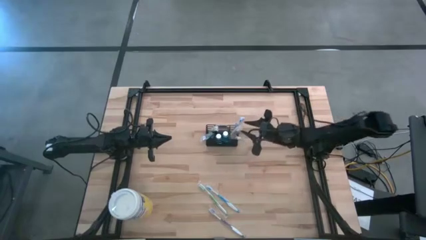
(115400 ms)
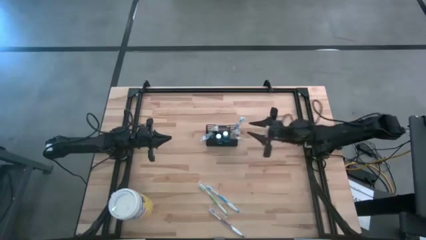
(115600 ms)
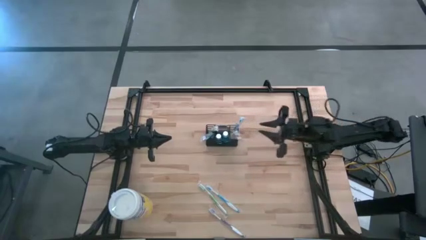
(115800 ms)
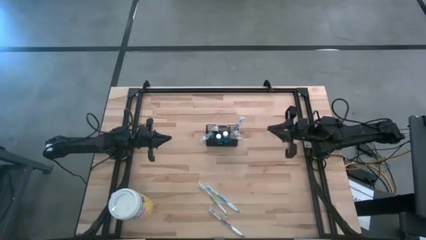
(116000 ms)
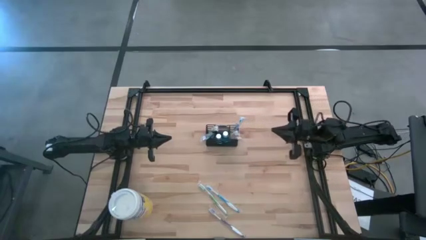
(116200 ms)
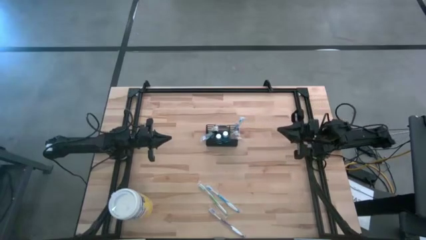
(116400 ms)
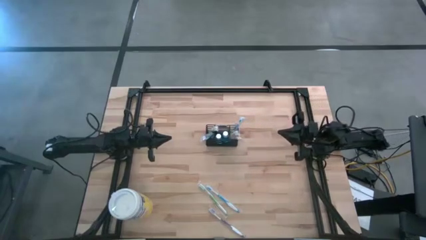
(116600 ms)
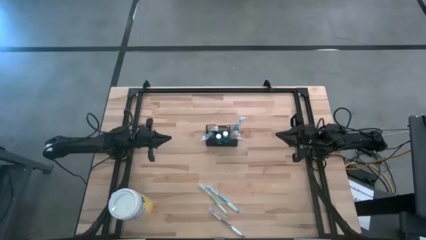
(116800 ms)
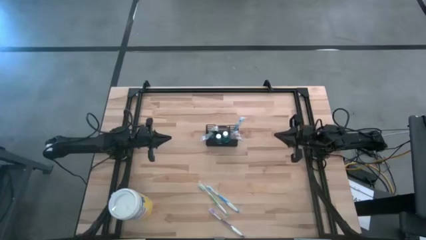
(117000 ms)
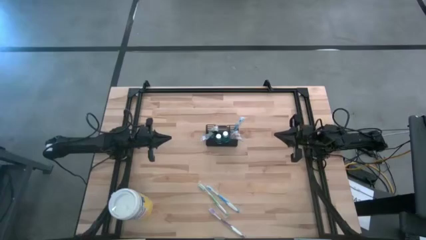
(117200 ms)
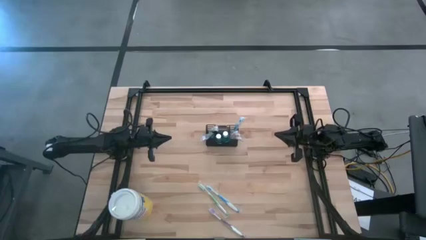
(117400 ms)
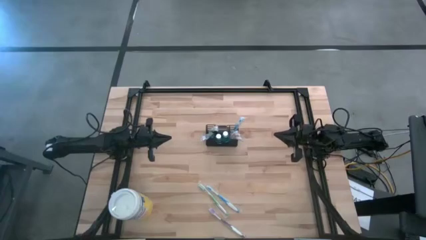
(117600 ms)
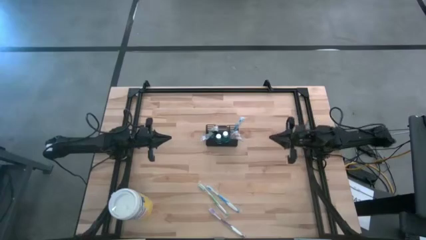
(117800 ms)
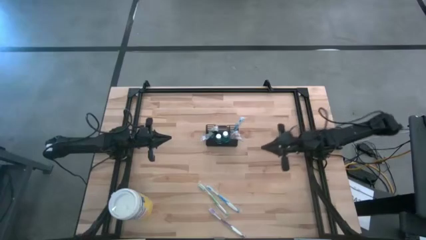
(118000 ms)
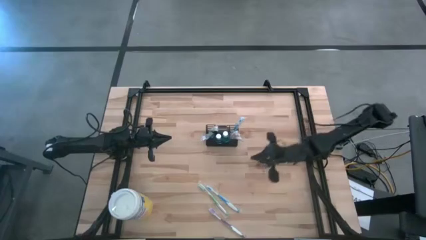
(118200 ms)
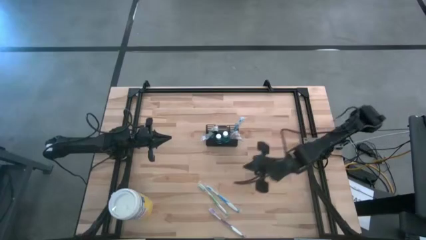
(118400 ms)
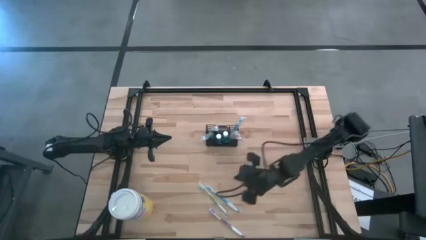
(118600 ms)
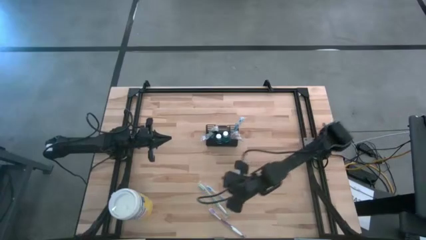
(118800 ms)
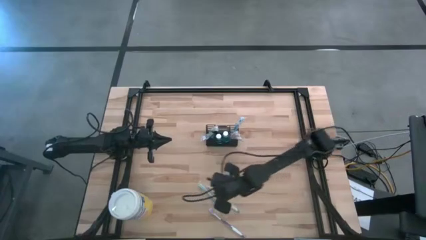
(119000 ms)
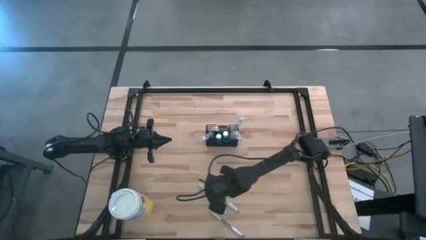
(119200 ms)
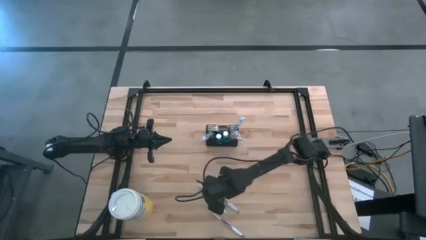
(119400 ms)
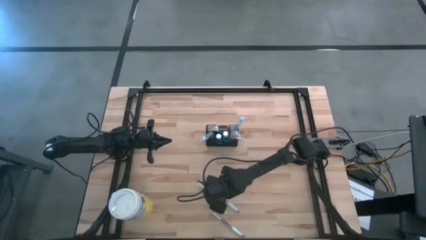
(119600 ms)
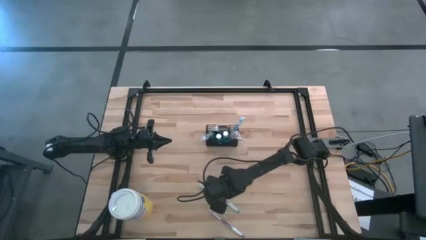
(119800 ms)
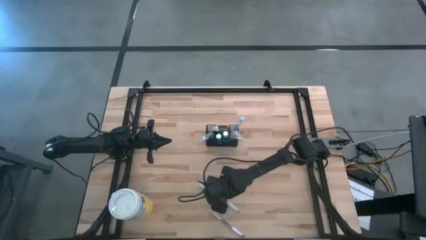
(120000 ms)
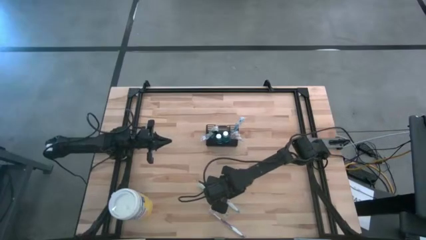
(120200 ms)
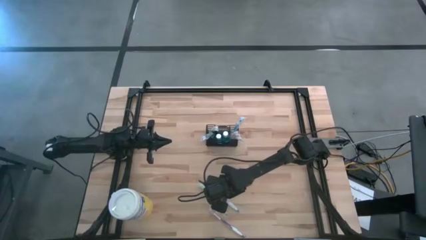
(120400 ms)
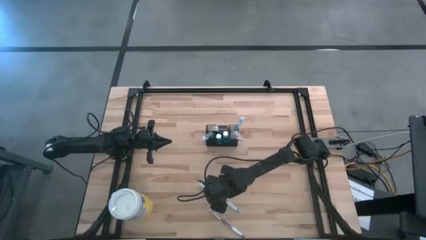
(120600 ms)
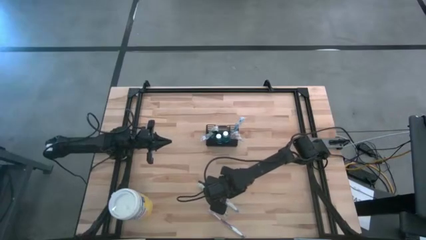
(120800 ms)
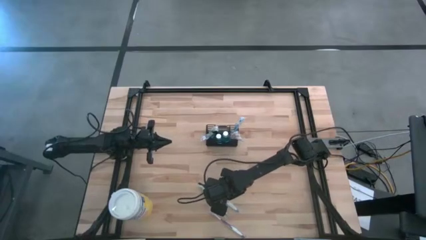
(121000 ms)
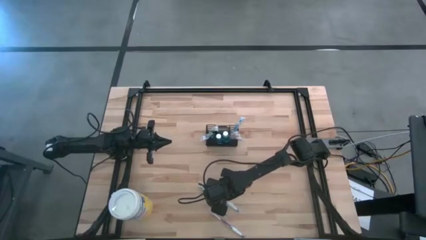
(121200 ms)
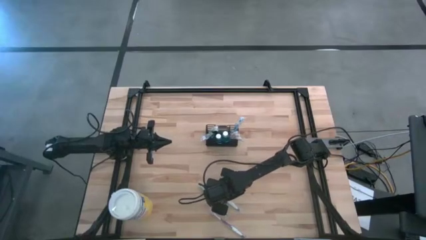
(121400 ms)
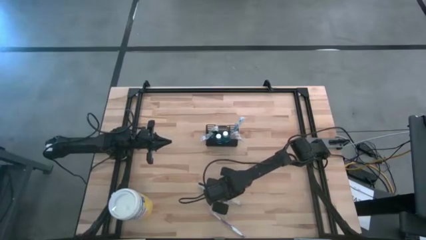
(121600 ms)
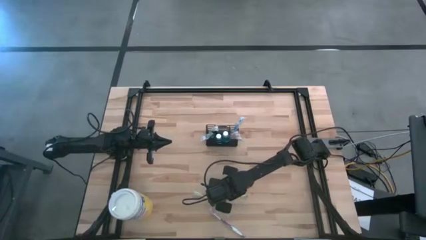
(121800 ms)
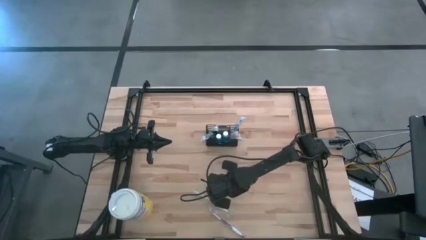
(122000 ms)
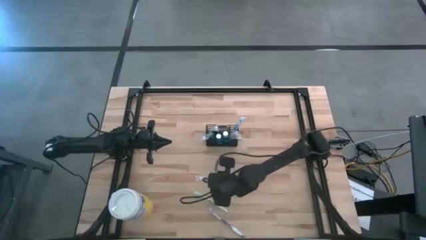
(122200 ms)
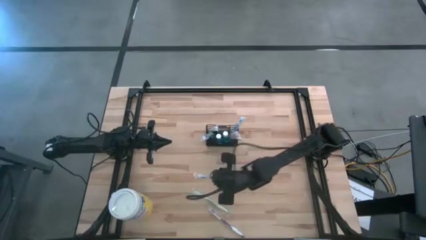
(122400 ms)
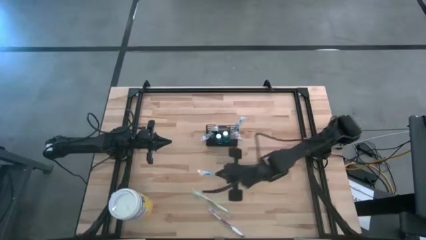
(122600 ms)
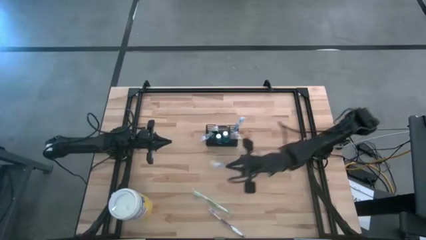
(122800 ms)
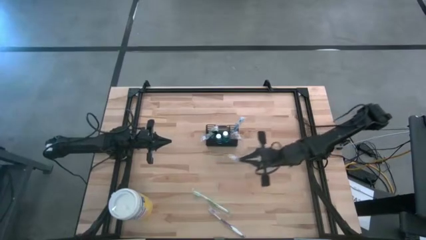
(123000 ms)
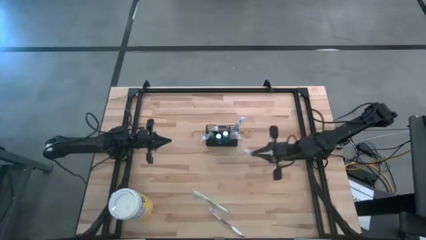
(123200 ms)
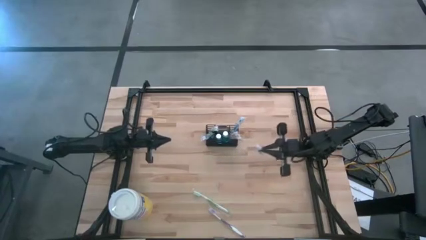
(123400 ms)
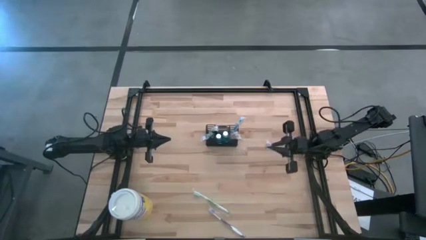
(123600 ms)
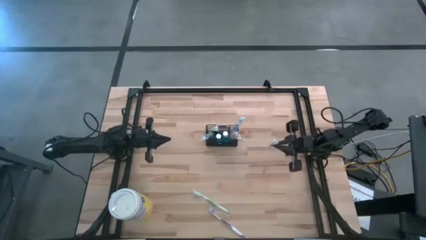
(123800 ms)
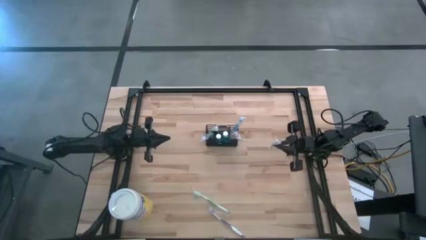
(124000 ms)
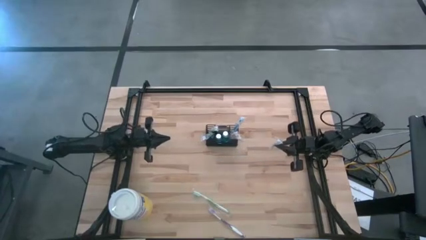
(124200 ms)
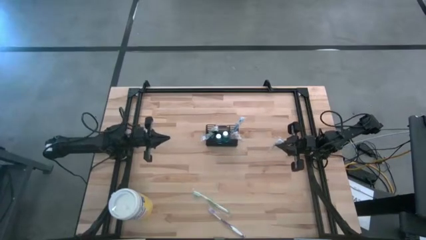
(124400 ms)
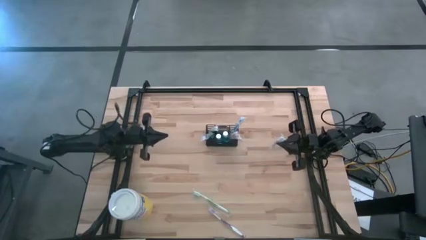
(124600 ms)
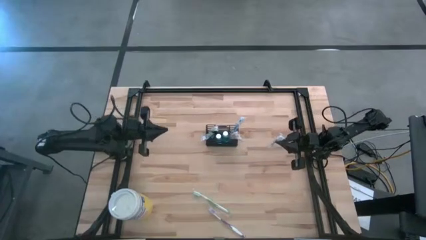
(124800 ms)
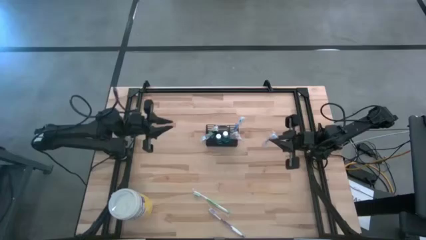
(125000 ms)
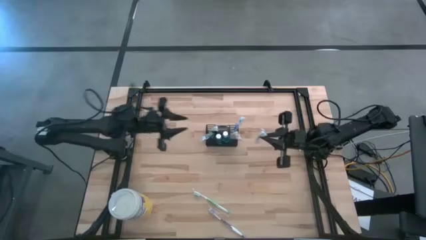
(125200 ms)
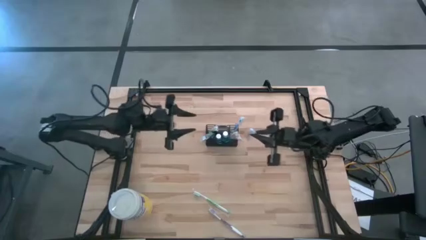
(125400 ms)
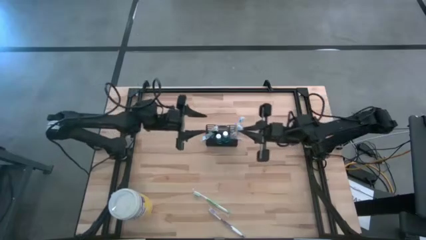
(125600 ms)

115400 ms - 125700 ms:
Task: Pick & Place toothbrushing station
Put the blue toothbrush into the wire organizer

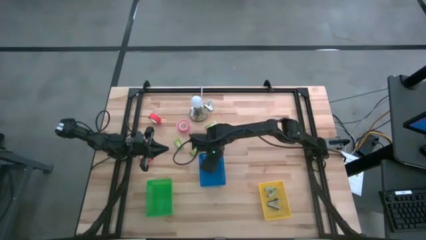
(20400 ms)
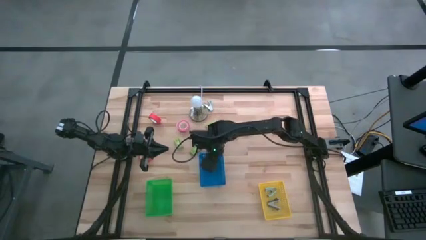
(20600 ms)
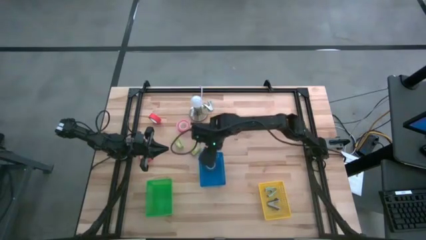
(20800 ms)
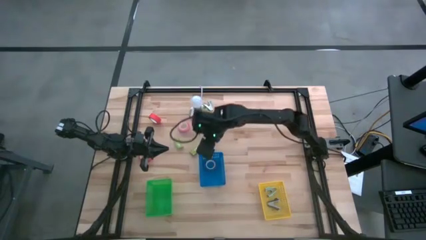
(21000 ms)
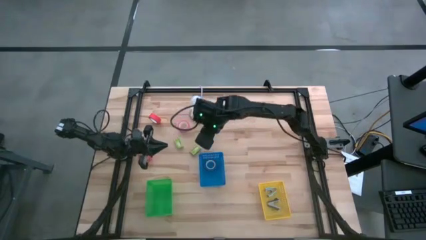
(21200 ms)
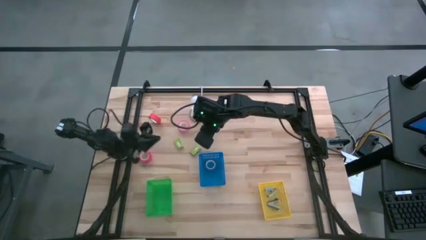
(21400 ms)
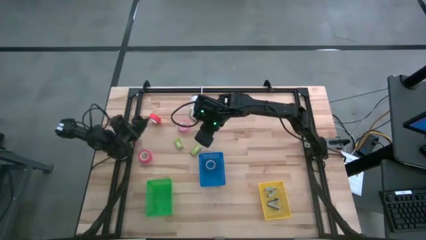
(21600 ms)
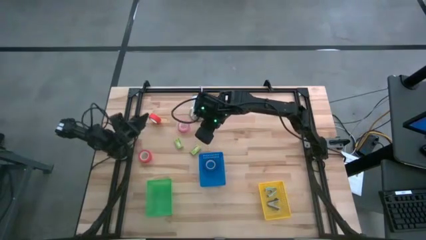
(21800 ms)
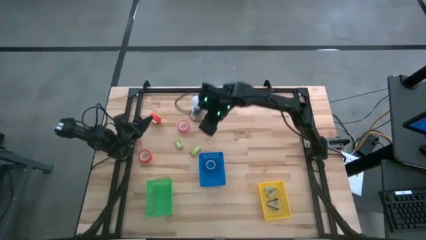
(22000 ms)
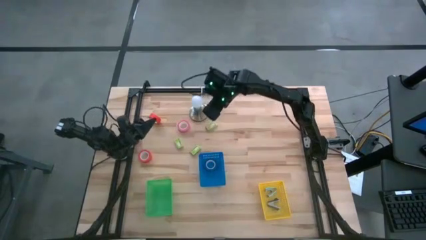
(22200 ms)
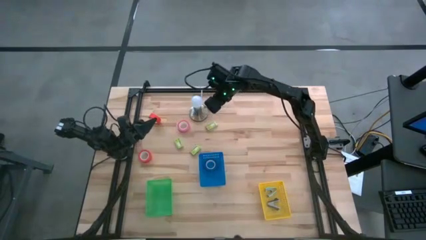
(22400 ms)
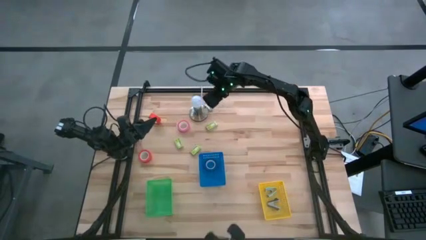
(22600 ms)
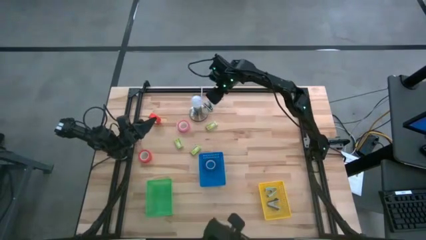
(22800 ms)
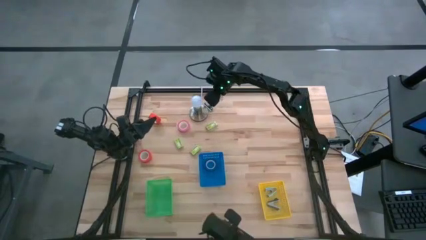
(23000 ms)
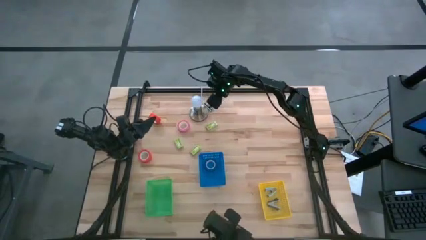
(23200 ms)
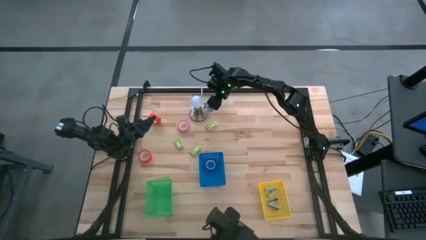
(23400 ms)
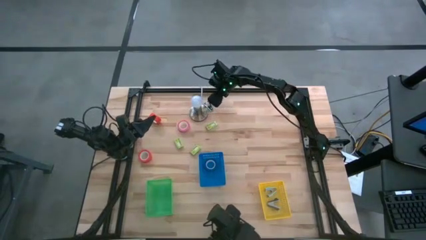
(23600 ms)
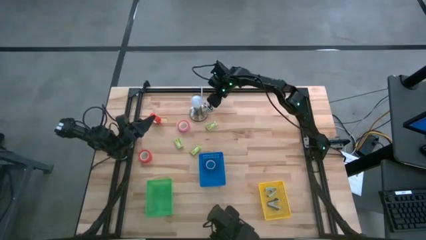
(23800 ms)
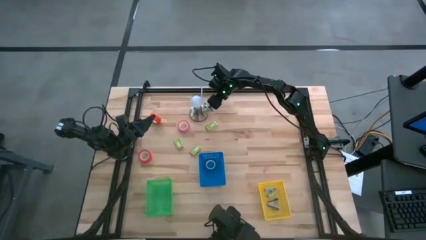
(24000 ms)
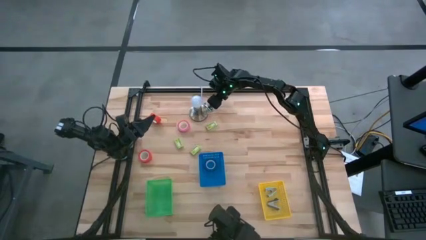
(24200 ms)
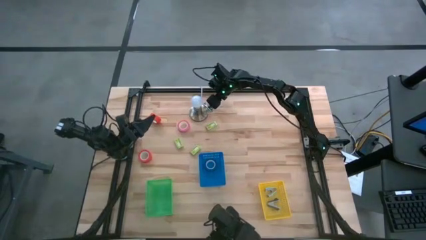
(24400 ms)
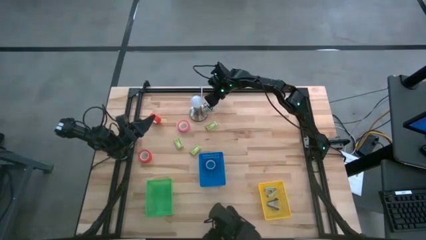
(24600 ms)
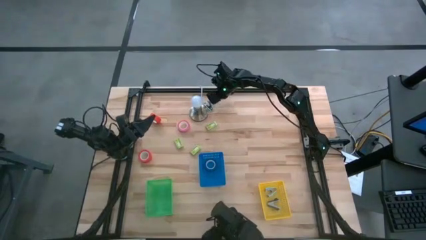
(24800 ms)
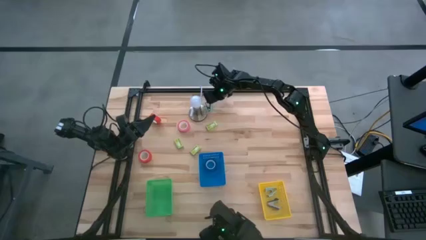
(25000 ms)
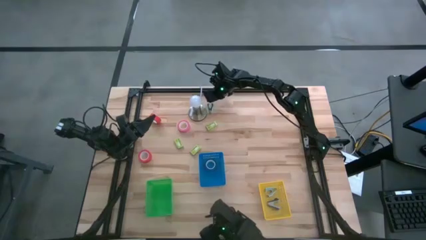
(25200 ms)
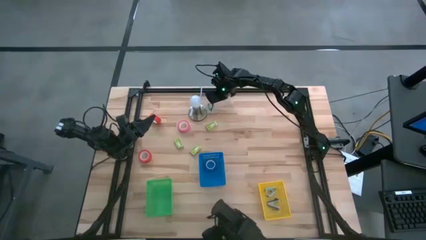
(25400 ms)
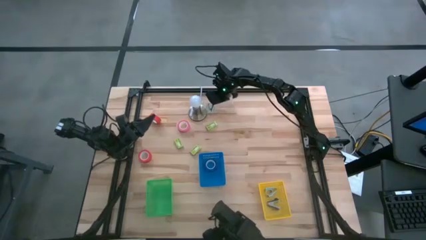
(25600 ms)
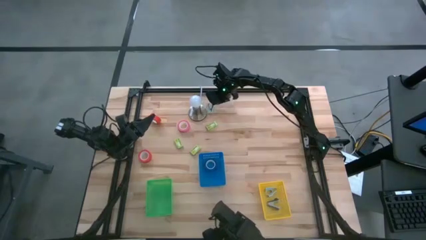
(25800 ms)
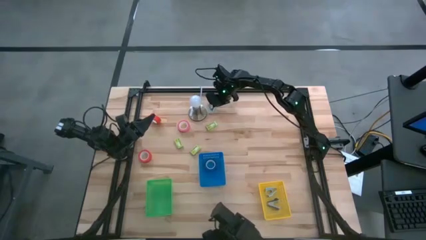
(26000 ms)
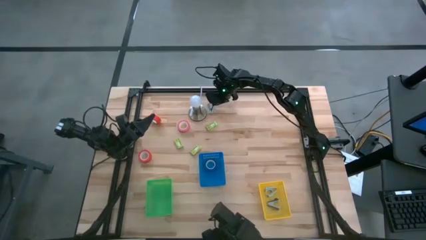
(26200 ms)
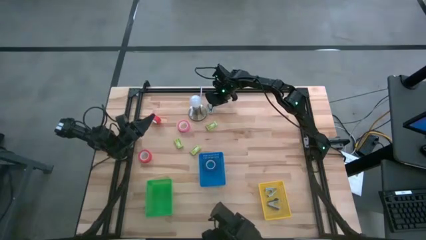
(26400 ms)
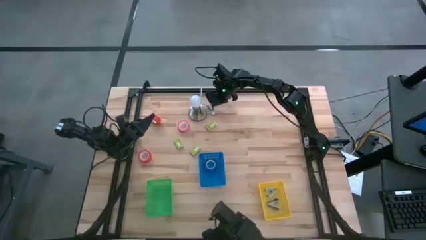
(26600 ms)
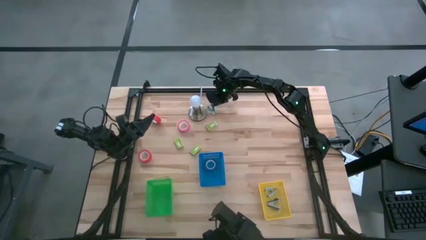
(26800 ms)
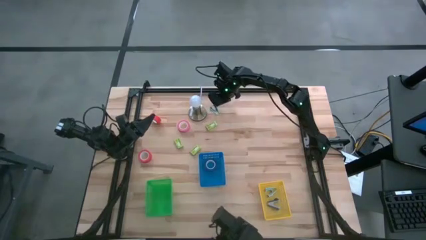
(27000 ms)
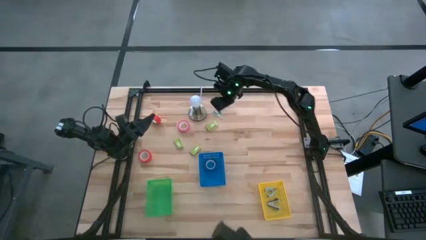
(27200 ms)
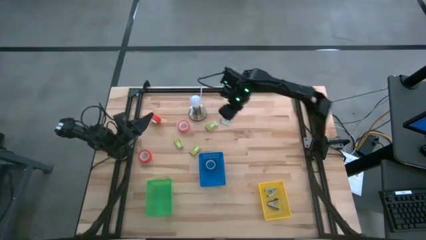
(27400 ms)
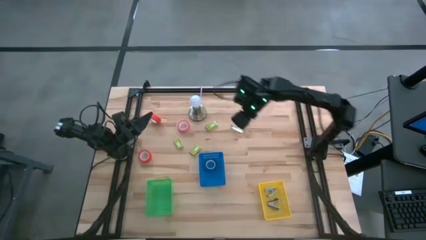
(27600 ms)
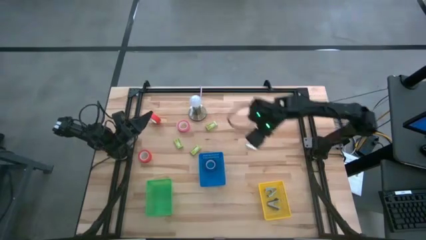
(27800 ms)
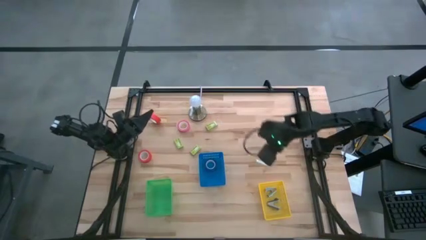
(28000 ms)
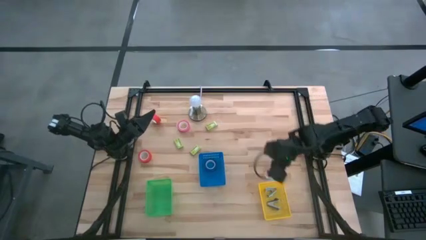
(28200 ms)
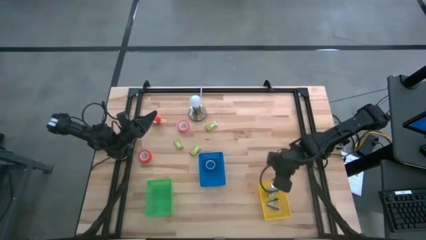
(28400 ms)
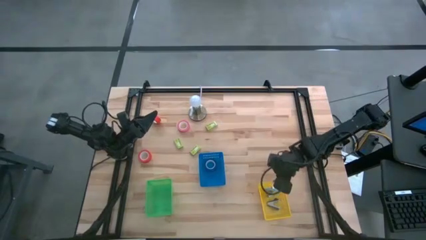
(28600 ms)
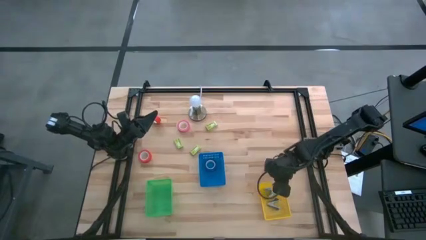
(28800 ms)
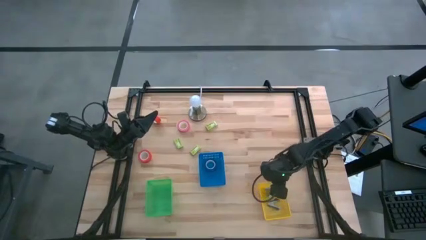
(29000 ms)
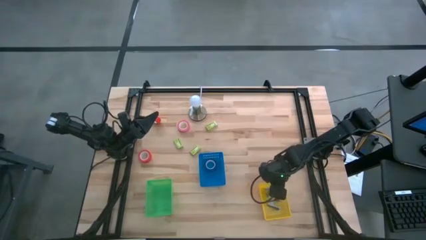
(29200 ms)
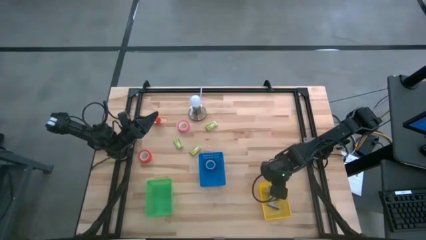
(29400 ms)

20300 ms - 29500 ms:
Task: Pick and place Stapler, Stapler remover, tape
Put the blue staple remover into the yellow bin
